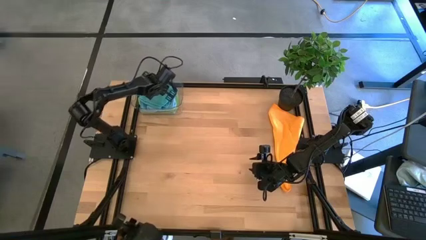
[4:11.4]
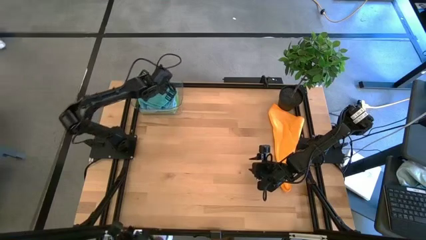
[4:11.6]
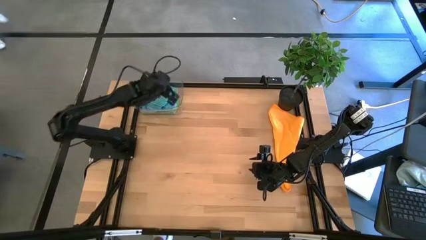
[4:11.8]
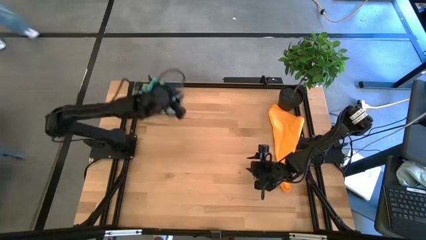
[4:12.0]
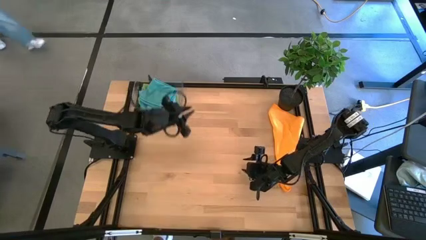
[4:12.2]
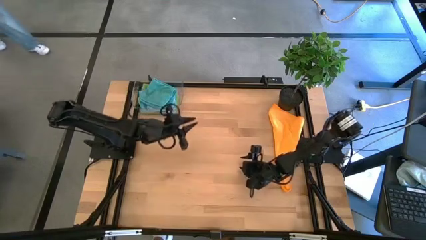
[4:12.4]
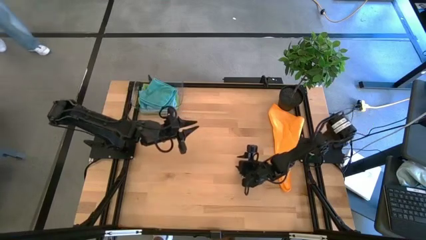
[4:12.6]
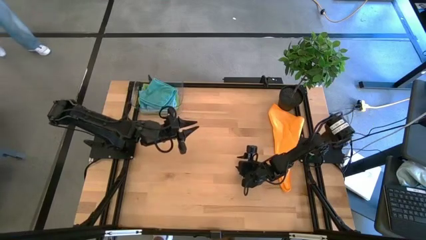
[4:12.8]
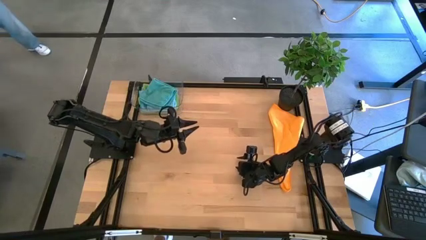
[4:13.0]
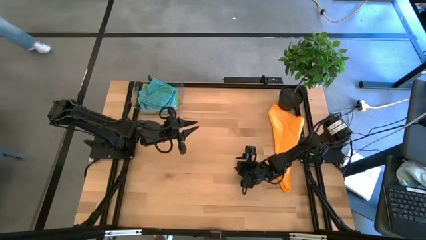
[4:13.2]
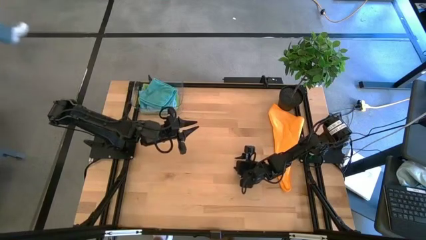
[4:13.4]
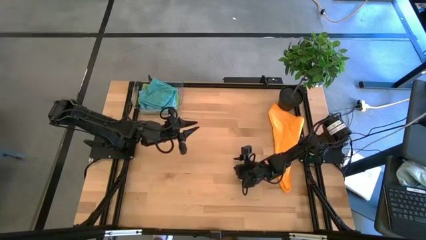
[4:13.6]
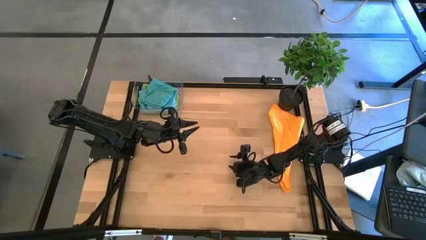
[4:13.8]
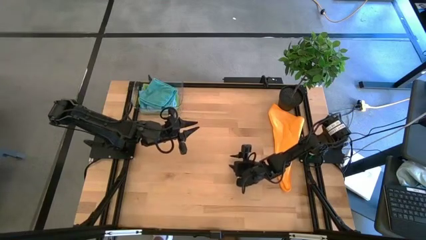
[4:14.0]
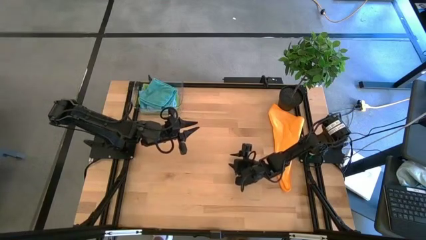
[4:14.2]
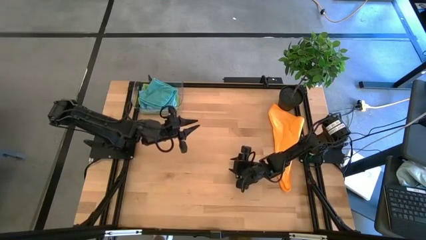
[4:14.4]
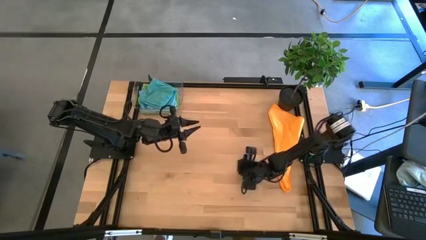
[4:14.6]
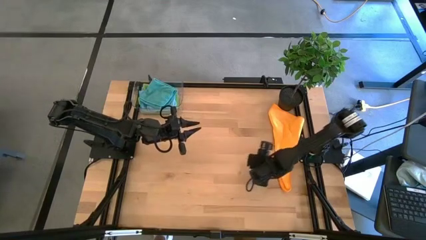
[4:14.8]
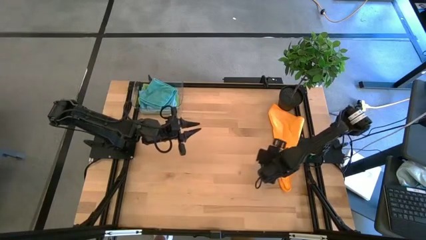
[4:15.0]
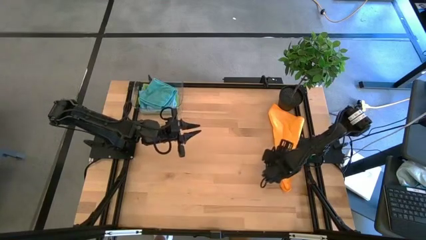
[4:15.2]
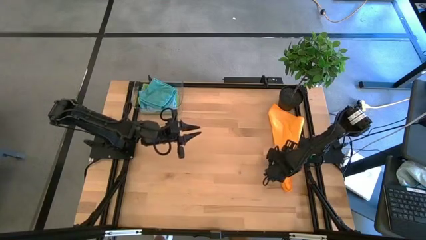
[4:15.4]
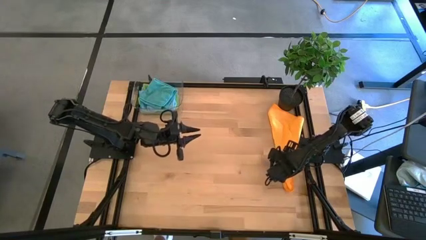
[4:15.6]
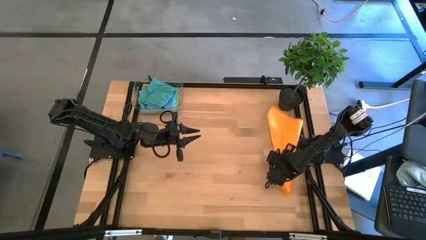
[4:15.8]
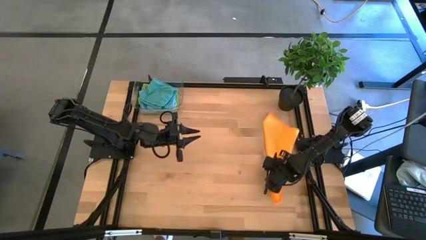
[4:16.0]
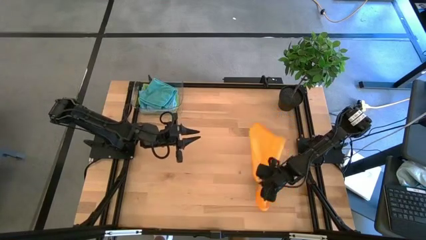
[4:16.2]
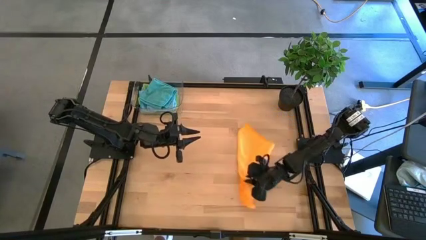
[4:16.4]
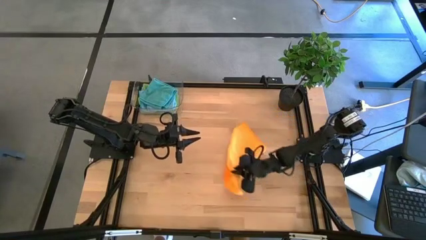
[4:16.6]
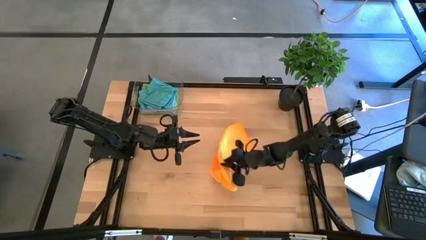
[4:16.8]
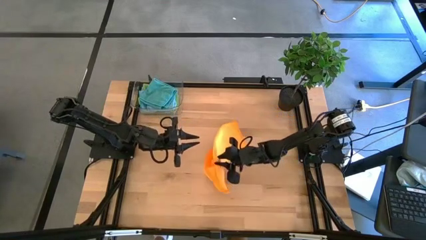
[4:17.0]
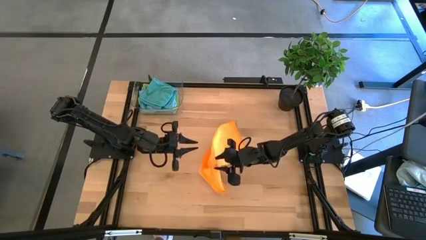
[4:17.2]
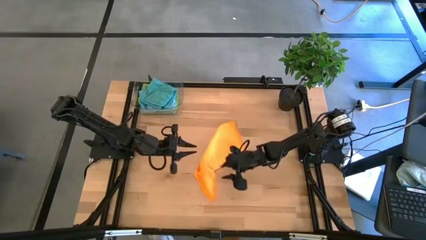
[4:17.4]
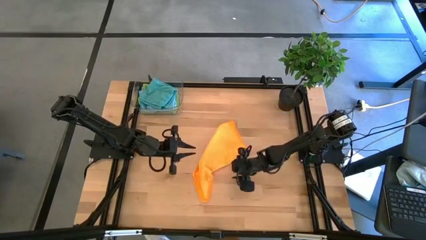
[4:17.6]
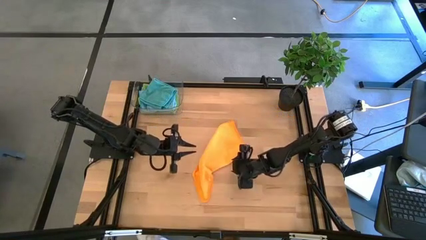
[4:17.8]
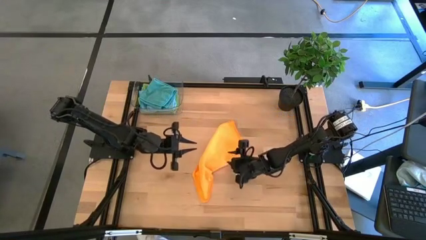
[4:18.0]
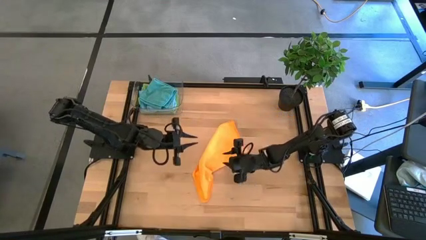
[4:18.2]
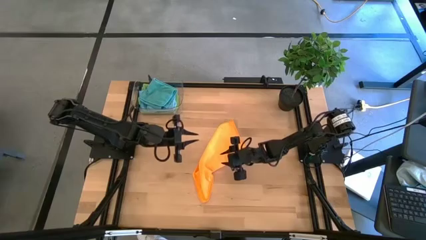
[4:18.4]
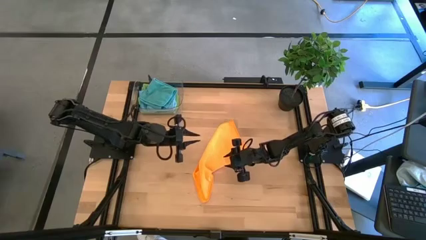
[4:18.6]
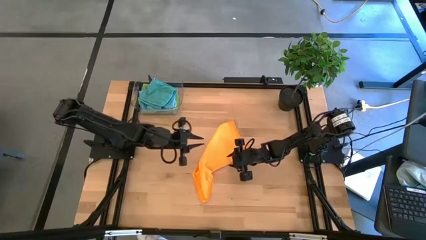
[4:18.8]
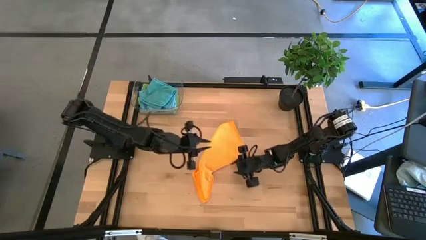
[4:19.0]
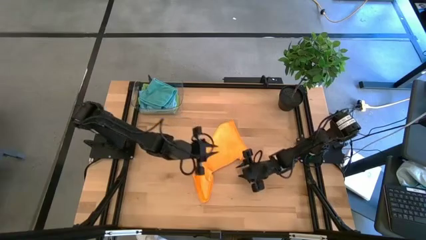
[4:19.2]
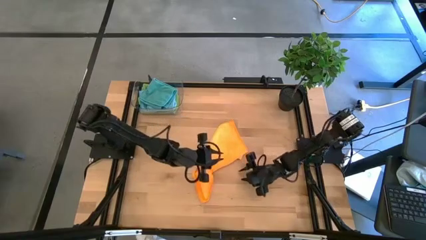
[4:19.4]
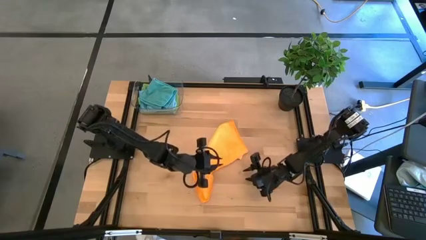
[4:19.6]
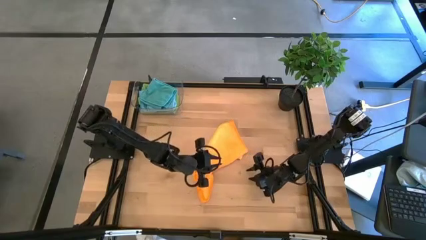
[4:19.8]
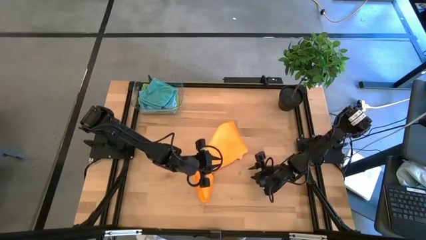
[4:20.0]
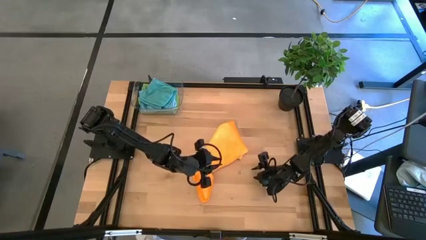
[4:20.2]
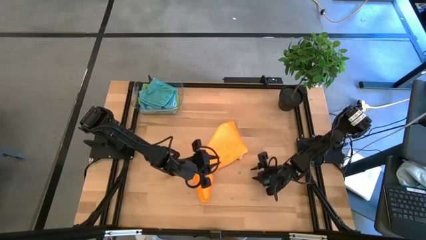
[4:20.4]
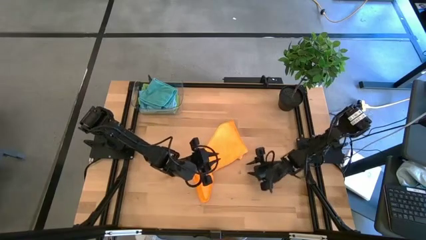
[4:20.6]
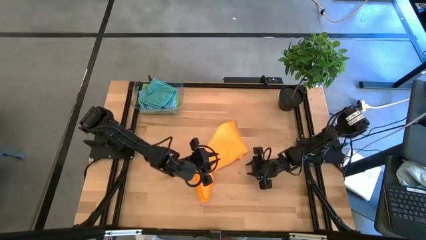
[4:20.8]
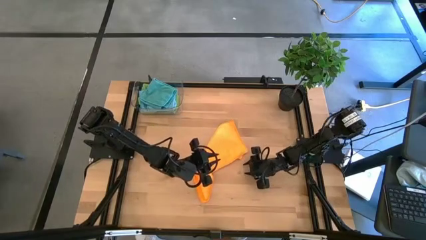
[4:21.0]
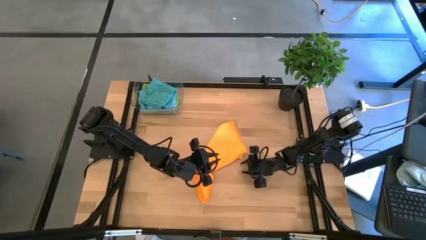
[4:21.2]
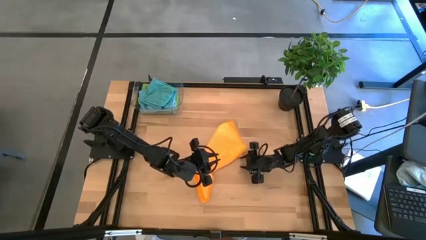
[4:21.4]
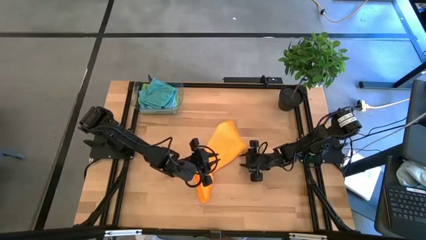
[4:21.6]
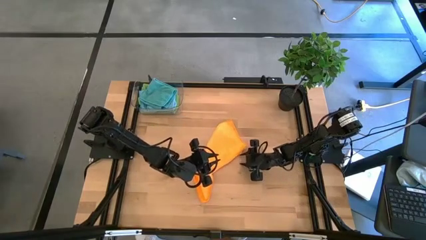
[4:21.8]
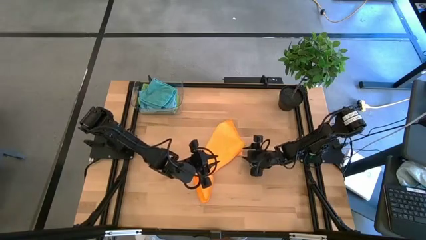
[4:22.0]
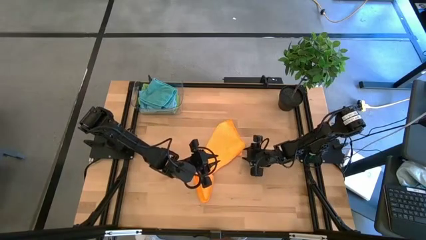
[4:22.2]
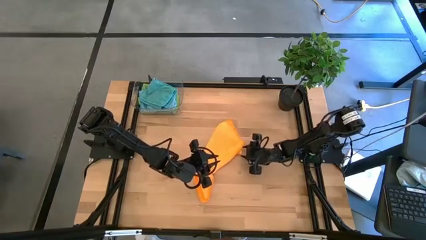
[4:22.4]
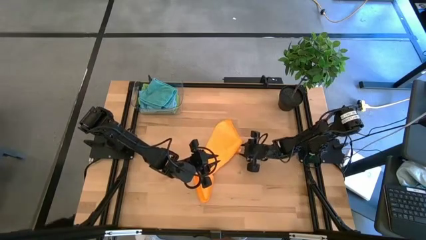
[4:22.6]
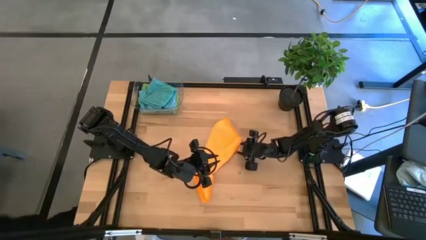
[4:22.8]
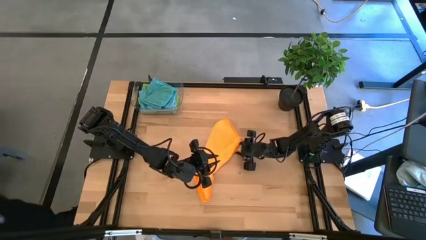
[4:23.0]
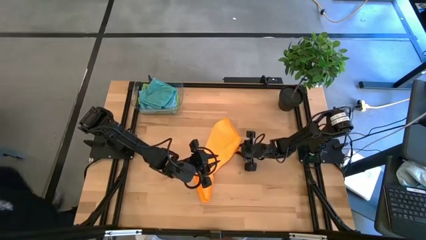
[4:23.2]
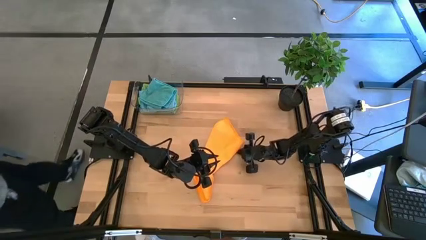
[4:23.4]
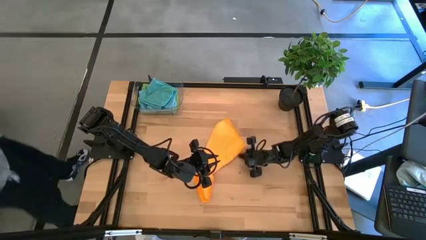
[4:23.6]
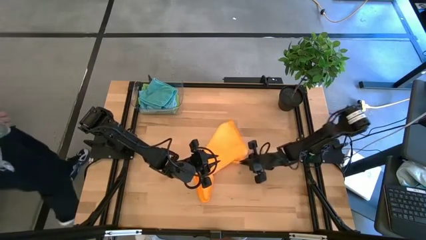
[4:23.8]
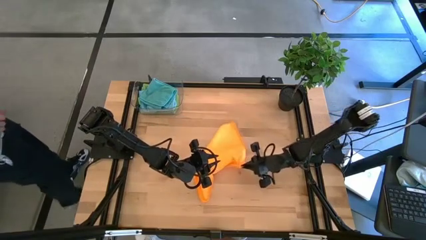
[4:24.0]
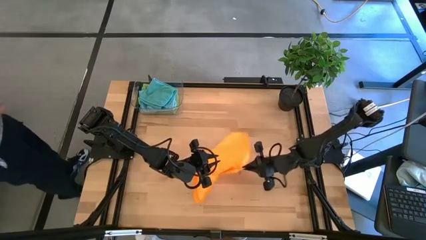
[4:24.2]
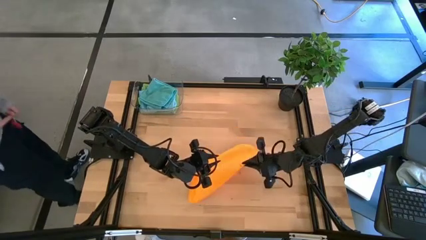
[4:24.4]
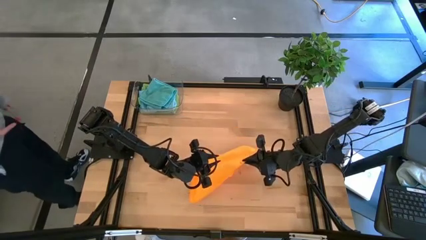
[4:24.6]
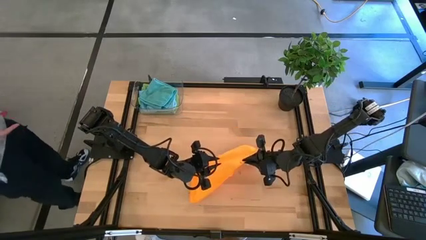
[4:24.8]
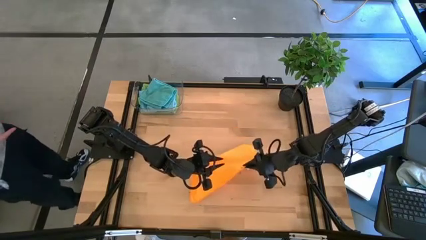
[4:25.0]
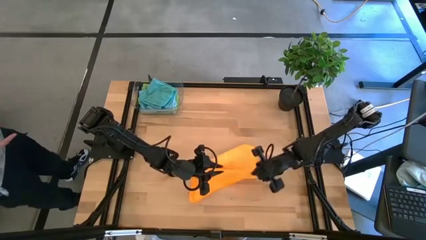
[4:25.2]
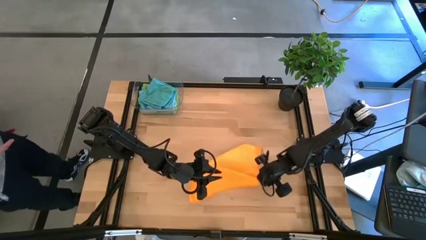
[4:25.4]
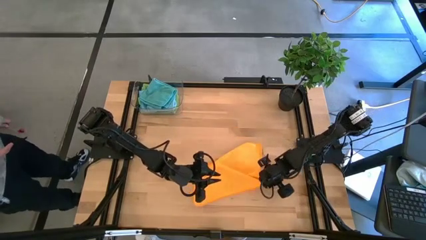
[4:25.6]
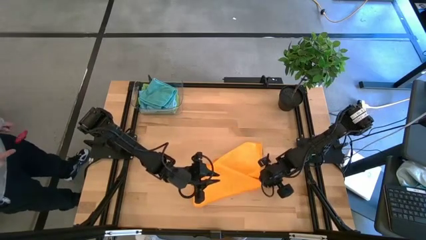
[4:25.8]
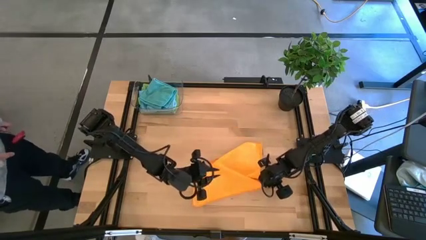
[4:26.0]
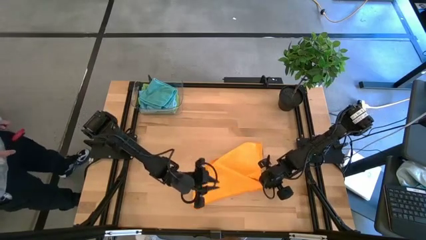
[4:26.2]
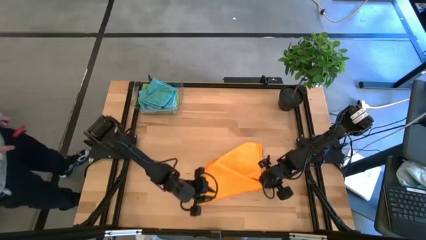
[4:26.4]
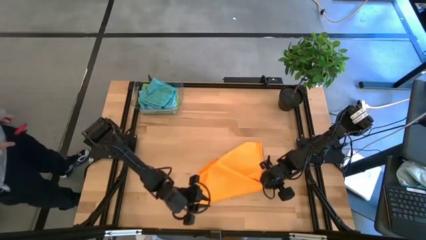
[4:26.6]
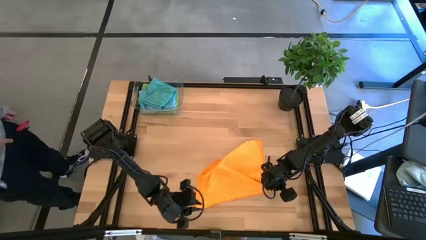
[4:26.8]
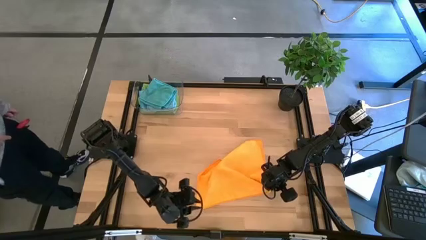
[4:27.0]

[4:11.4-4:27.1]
Task: Fold microfiber towels
Fold the orange microfiber cloth
